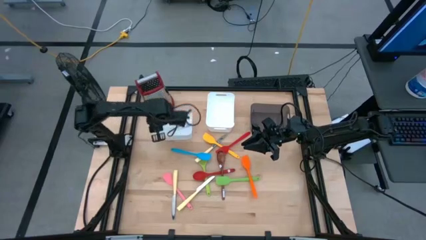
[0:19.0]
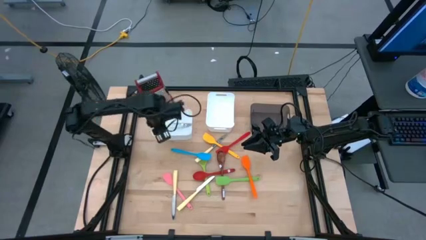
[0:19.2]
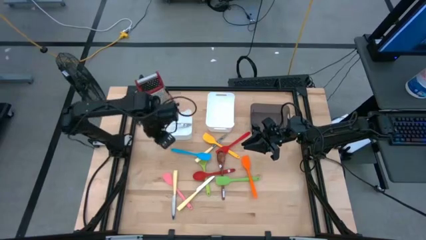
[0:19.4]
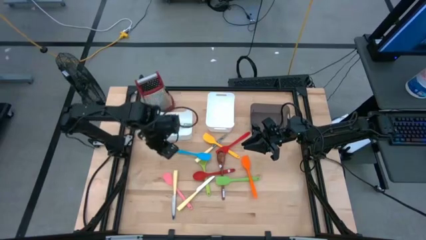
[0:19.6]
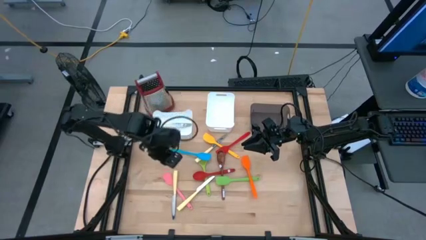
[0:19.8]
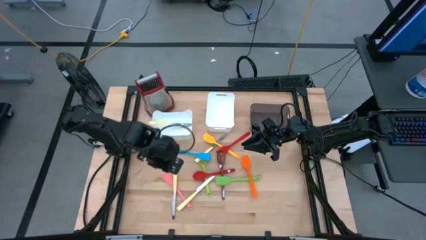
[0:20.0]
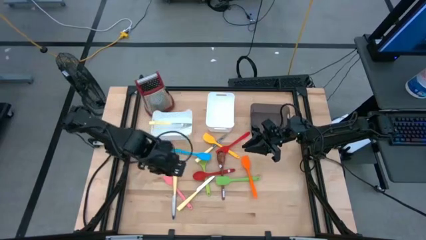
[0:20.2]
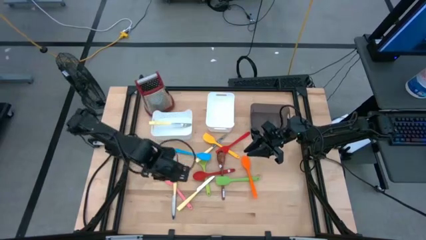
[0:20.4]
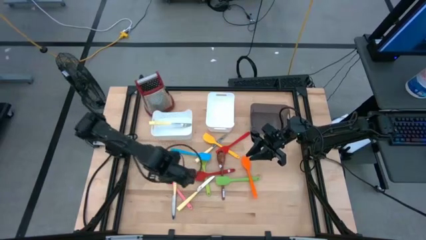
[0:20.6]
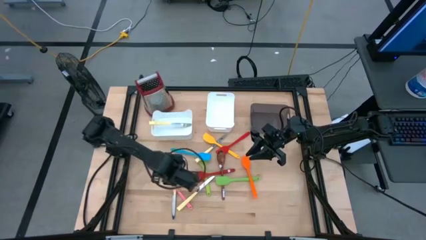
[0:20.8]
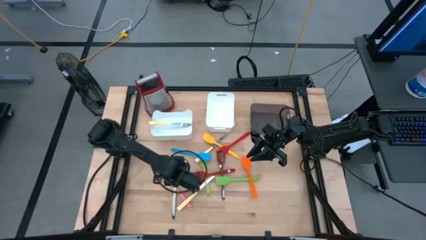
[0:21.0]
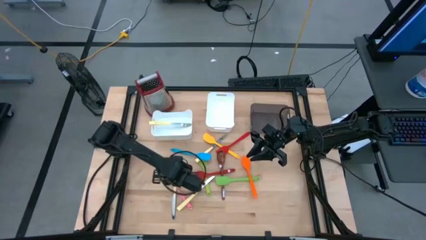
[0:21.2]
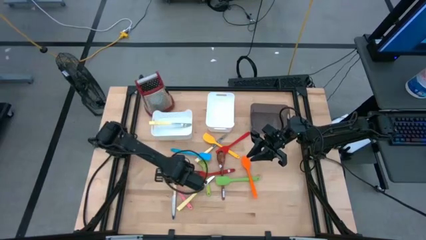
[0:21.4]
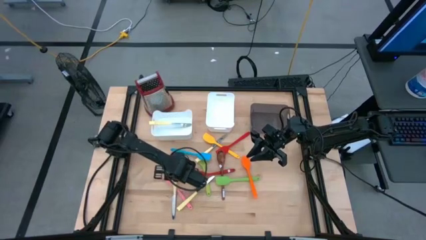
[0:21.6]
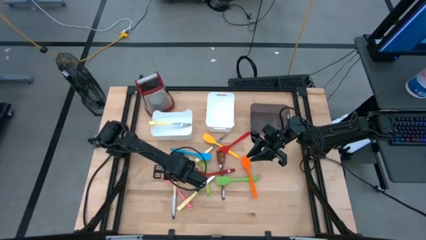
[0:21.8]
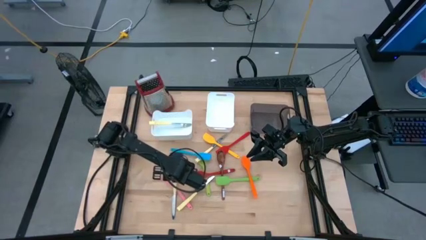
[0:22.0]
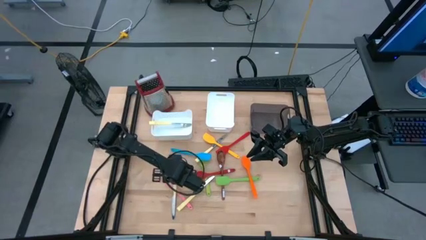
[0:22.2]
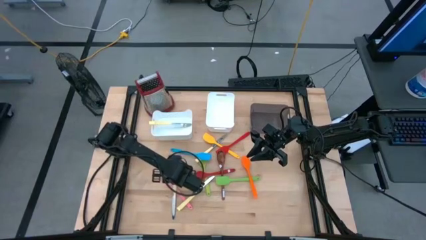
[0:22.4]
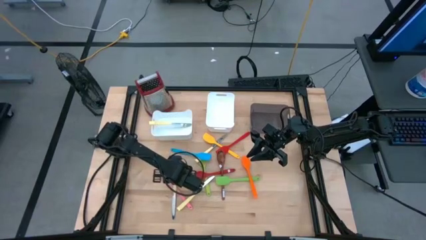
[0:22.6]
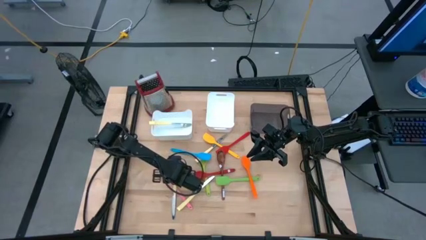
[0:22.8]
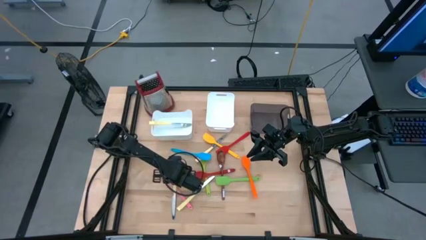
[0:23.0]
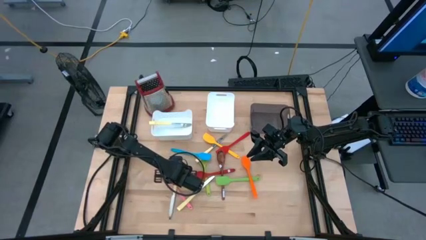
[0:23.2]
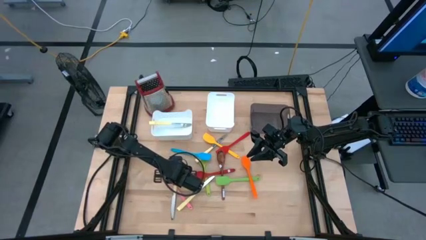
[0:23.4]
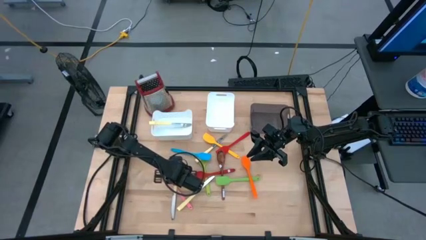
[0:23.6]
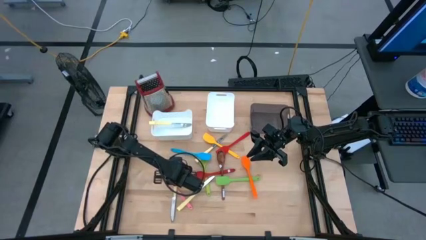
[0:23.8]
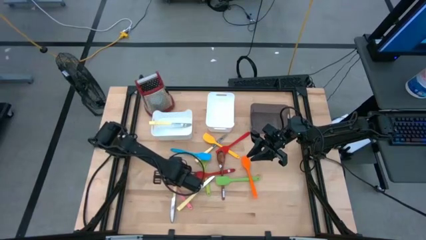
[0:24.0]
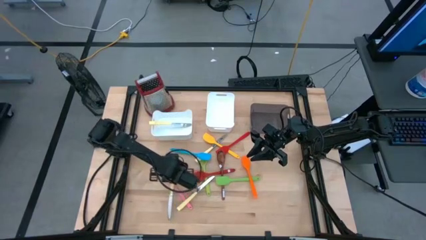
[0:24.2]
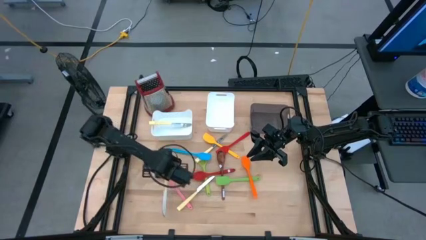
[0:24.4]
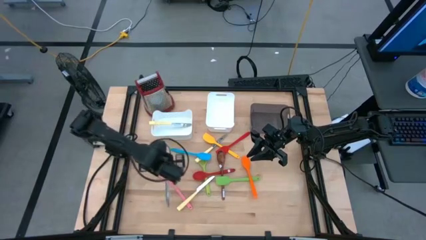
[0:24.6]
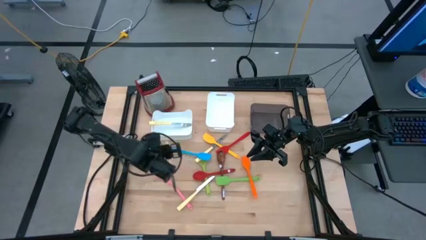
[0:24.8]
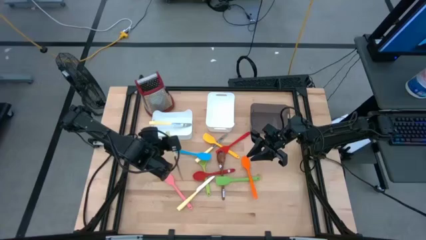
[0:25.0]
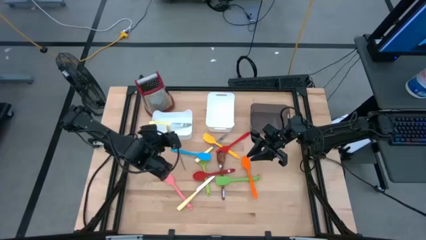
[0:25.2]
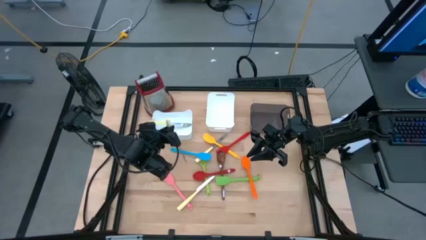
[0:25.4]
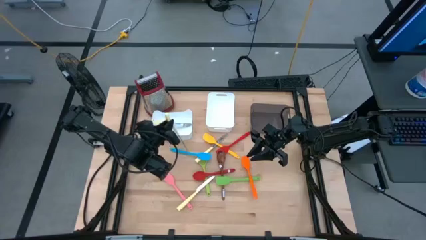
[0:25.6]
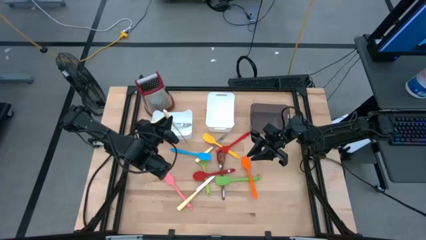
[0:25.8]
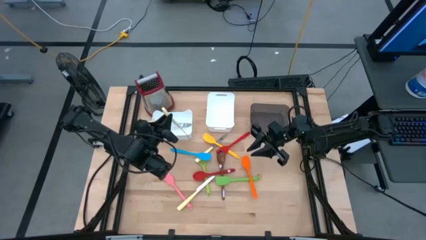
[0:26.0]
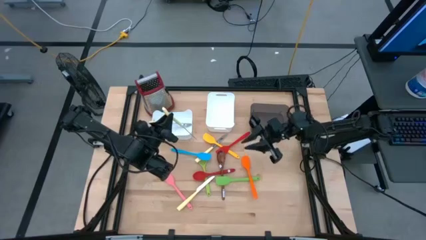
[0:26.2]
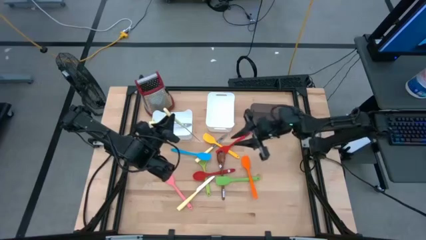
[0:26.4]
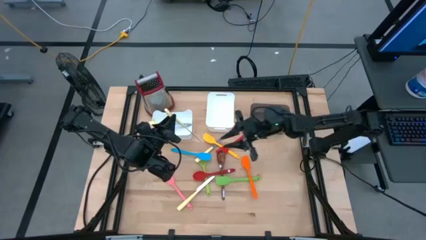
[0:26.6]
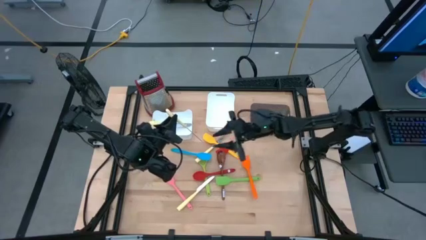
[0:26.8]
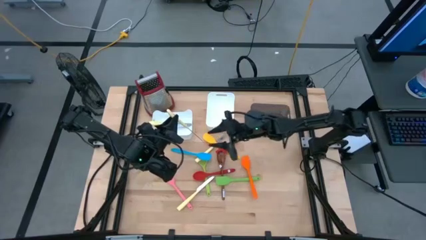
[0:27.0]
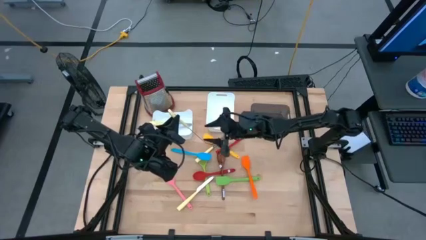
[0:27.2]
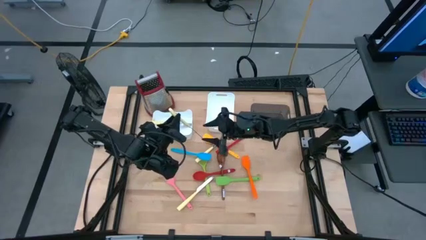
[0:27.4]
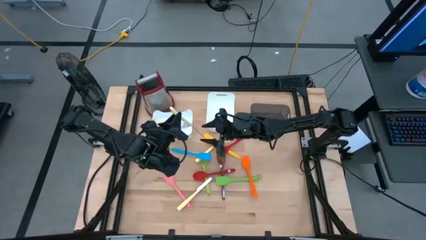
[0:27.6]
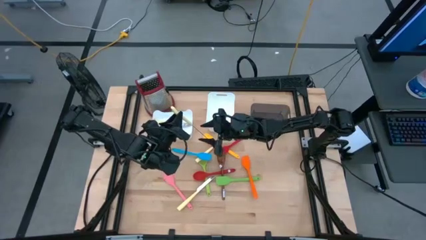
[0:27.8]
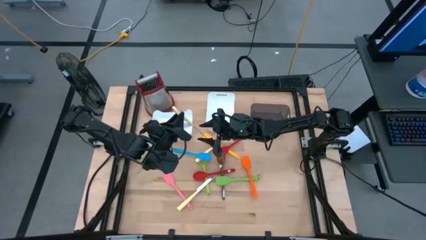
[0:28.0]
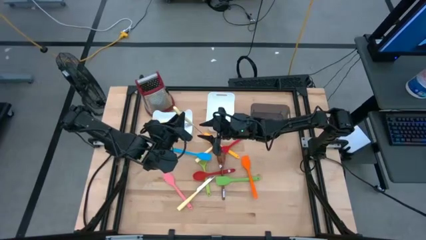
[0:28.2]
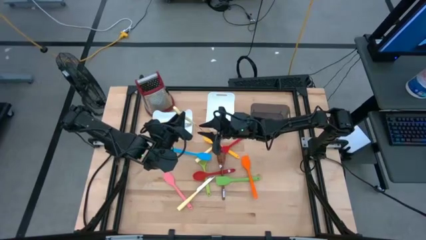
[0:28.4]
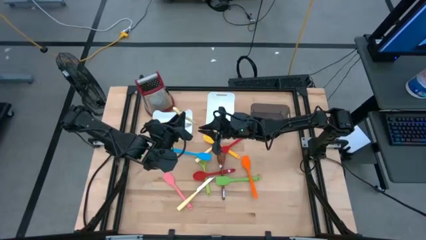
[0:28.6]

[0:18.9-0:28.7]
Task: Pick & Place Kitchen Items
Put the yellow knife into the left white bin

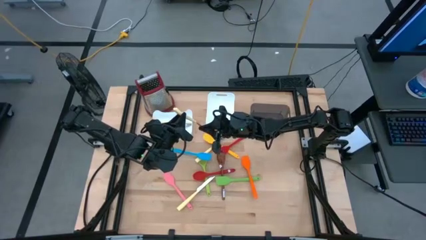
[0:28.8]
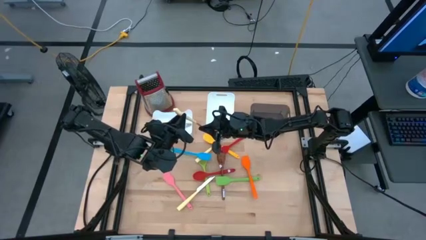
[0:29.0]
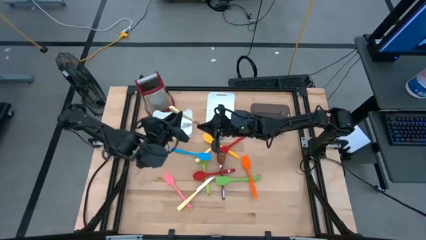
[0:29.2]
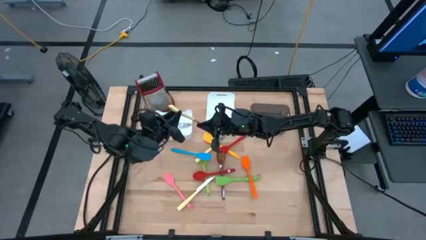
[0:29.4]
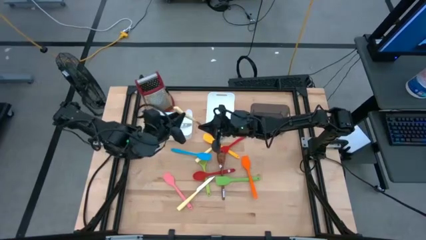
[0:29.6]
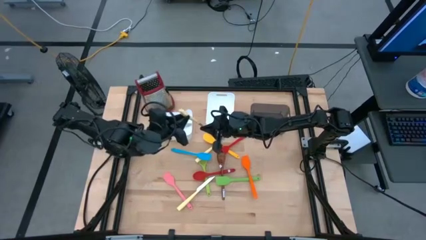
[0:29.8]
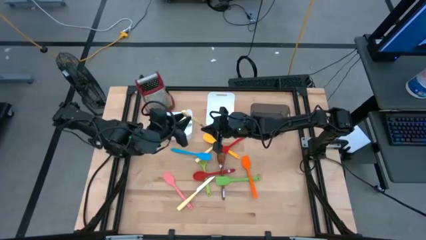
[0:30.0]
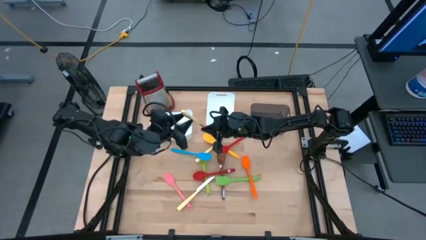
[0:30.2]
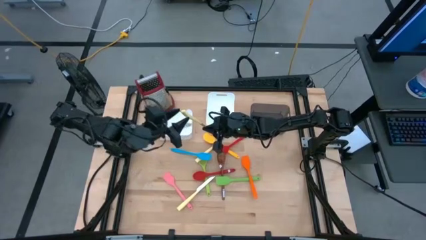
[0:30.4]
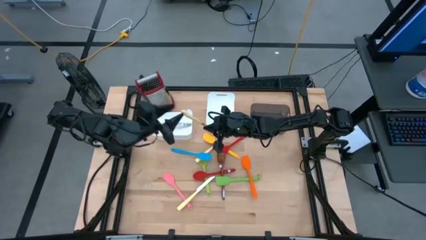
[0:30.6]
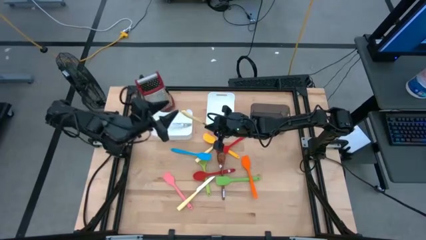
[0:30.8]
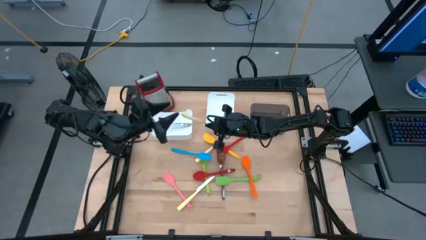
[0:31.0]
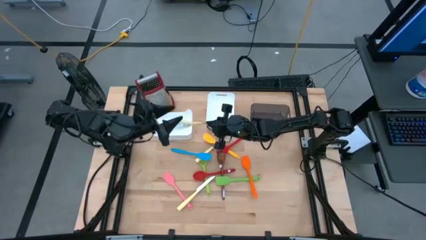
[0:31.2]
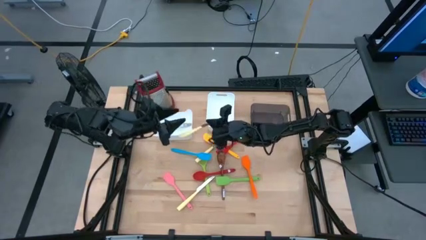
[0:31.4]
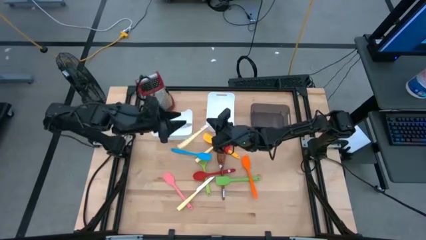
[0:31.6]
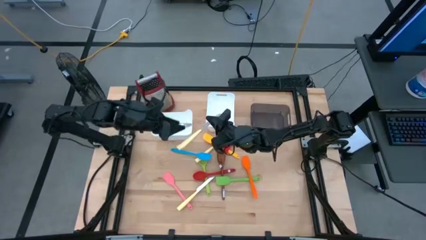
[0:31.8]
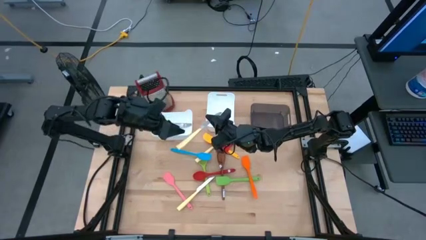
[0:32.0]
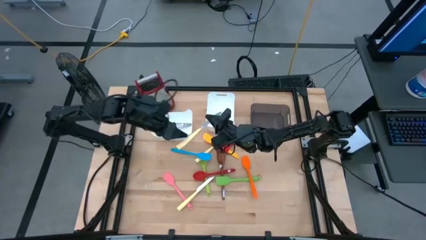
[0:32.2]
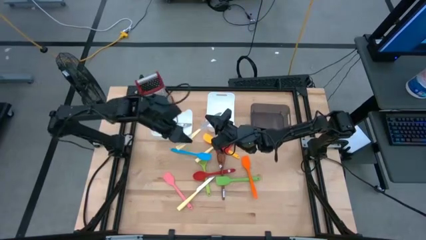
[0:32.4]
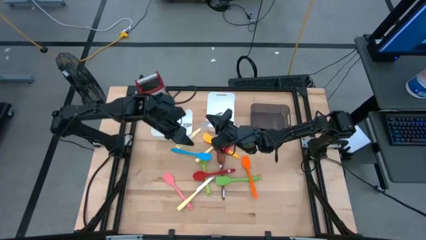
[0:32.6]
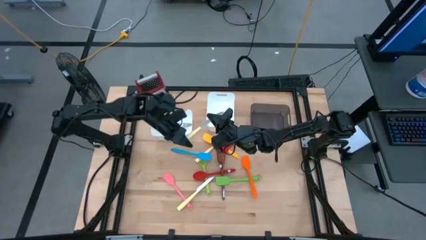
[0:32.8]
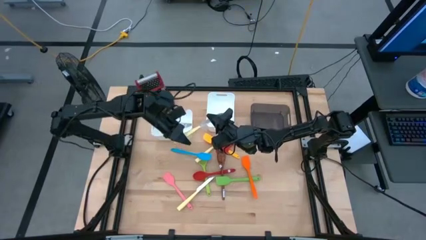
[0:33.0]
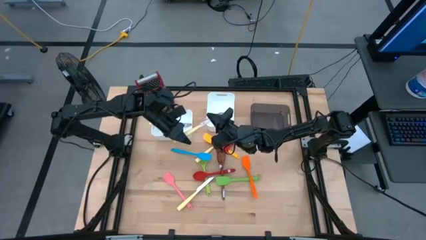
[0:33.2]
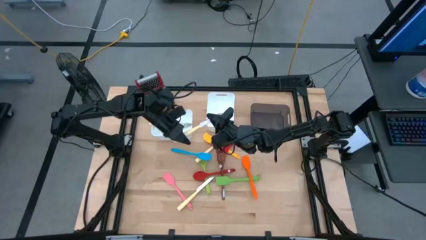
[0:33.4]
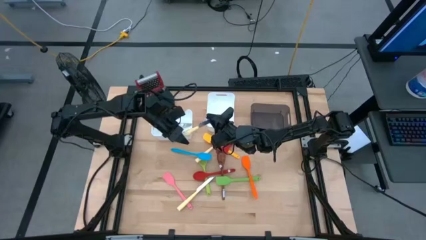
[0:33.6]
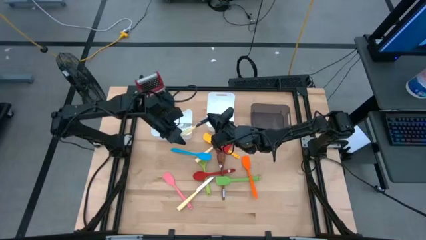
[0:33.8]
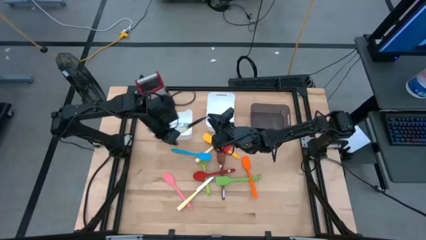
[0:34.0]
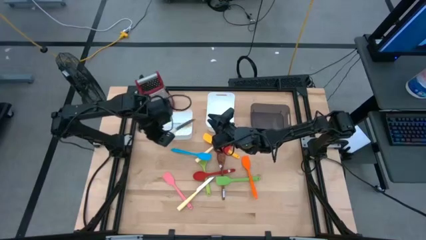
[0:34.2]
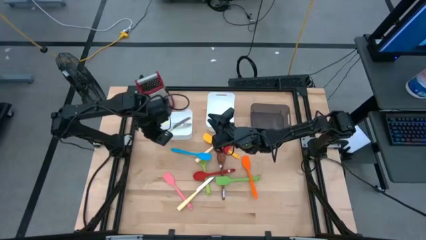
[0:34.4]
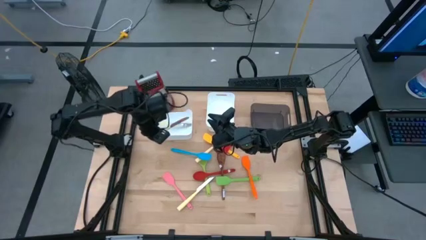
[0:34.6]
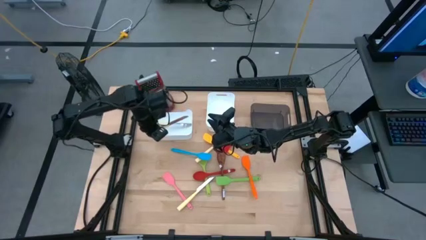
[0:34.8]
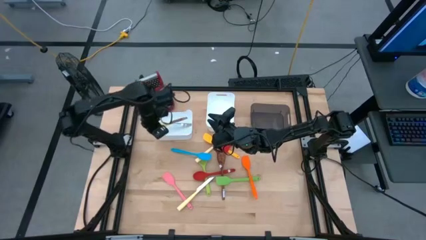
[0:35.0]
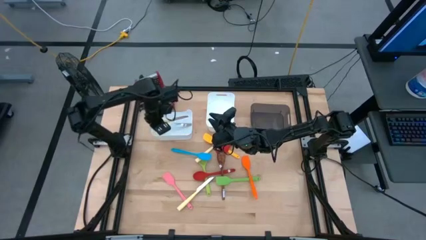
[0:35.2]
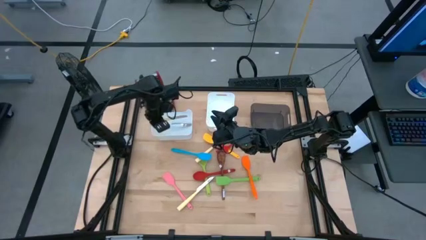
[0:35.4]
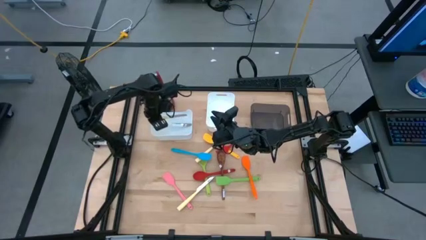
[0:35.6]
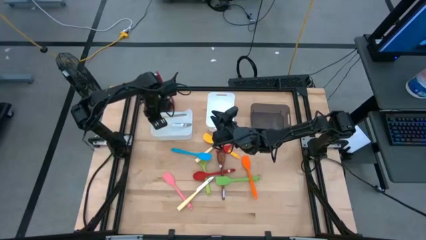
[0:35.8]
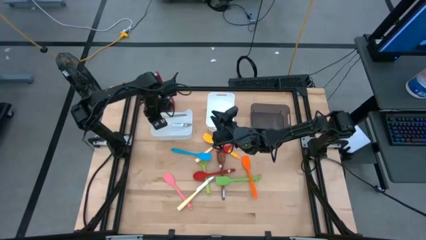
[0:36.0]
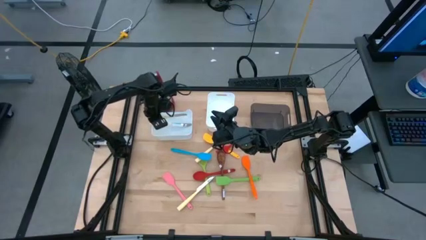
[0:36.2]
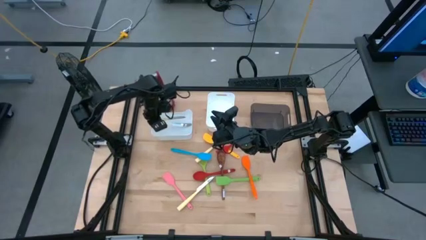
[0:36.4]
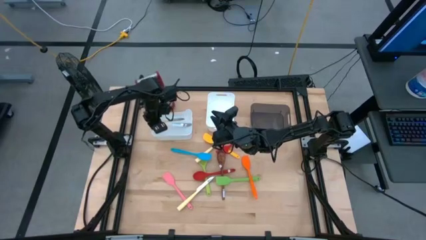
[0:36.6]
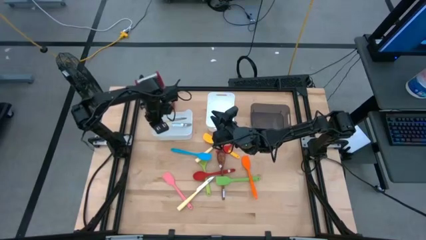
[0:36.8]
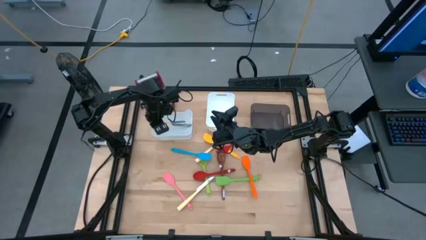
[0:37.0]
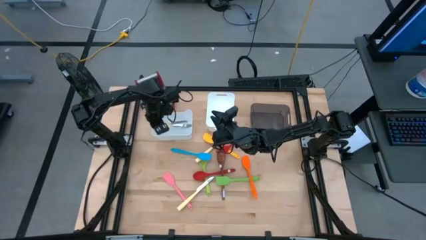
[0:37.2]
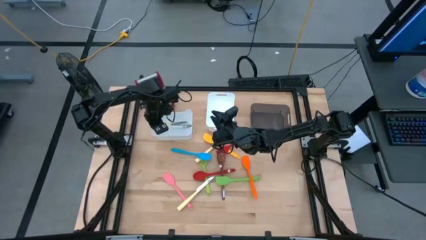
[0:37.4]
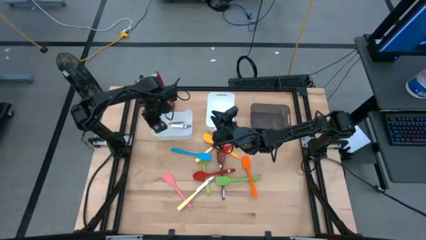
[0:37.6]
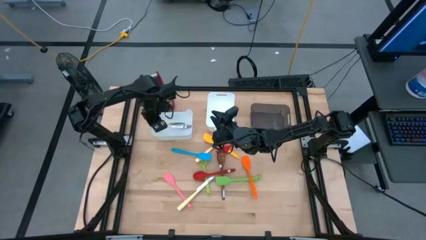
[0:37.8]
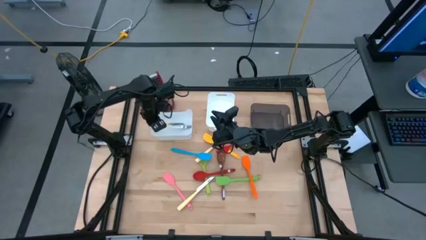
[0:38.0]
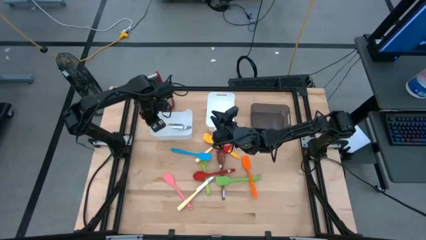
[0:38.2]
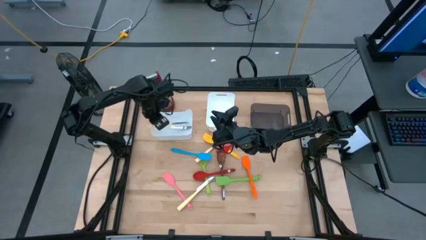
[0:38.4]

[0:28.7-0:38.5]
Put the yellow knife into the left white bin
